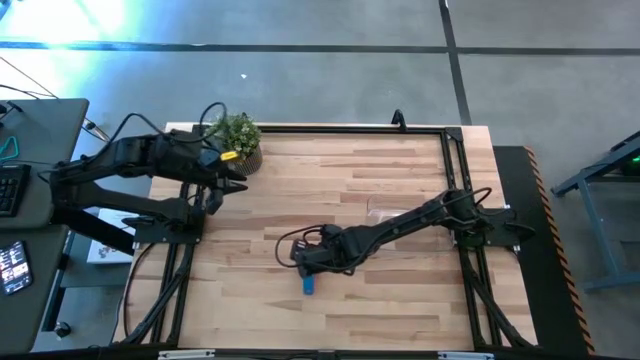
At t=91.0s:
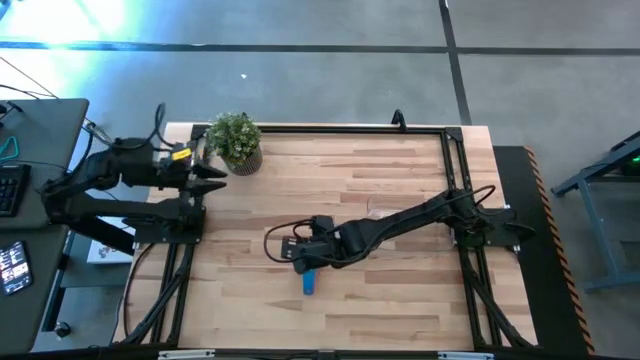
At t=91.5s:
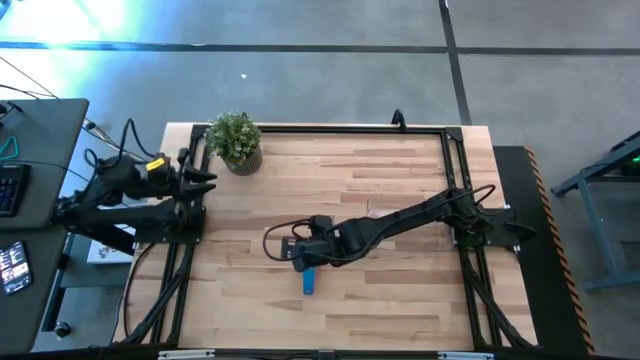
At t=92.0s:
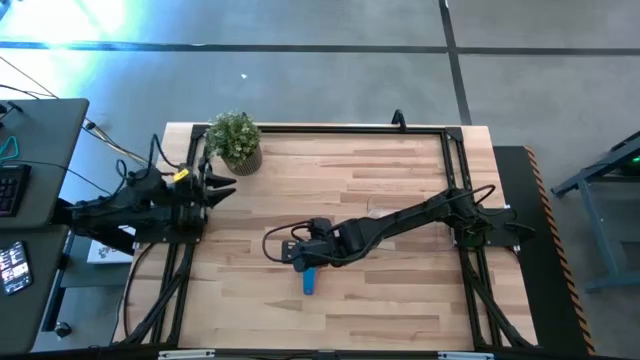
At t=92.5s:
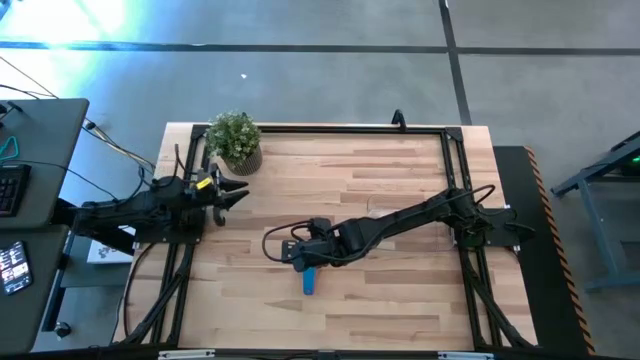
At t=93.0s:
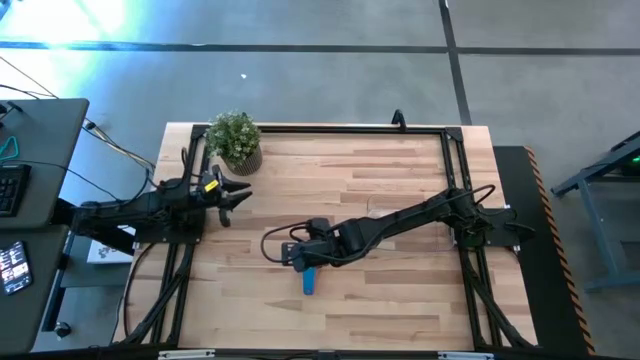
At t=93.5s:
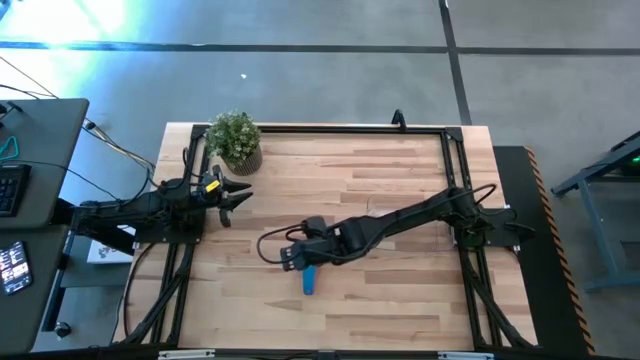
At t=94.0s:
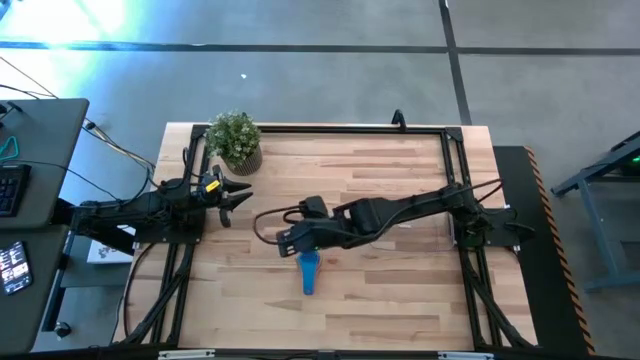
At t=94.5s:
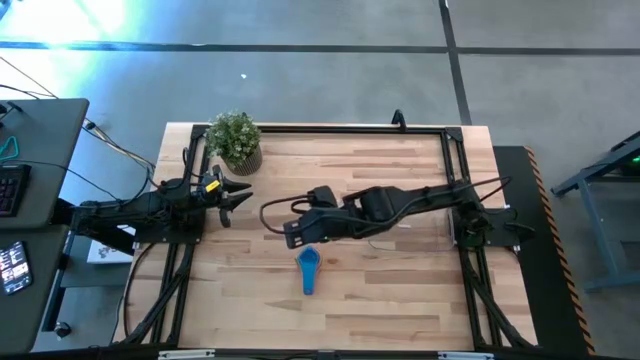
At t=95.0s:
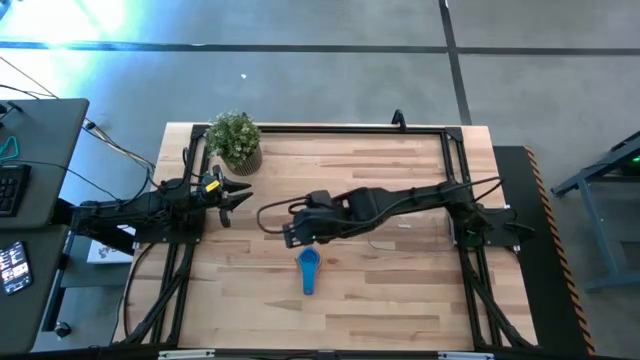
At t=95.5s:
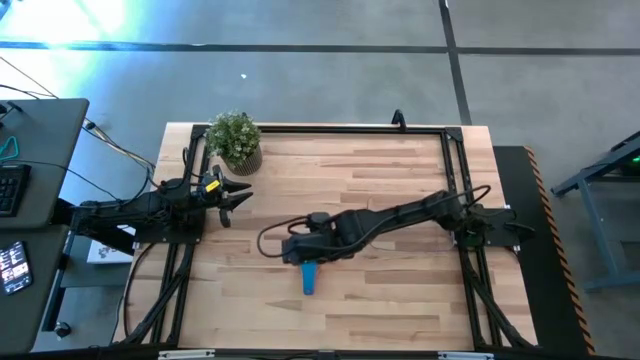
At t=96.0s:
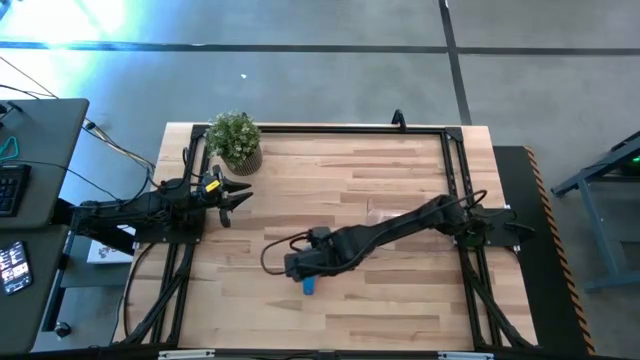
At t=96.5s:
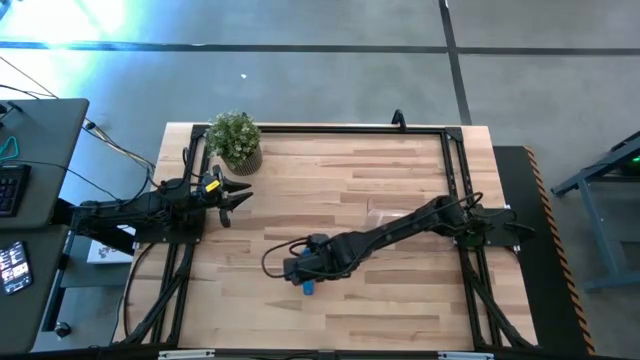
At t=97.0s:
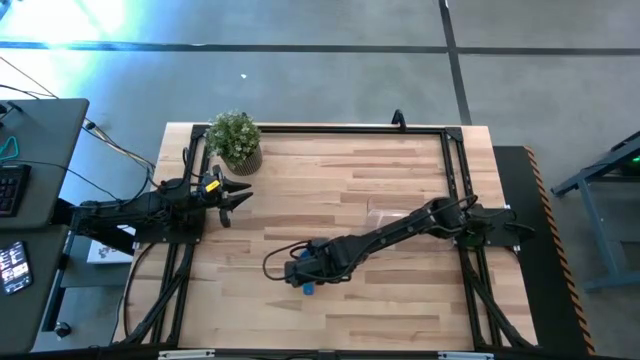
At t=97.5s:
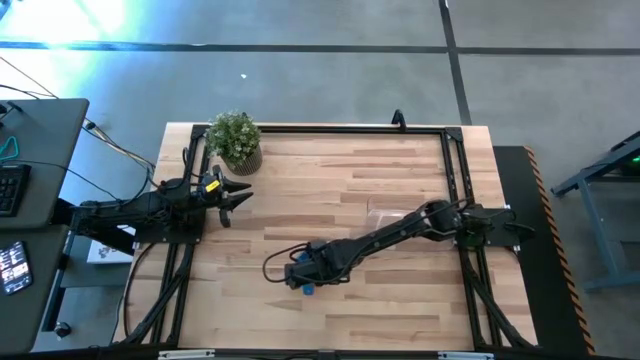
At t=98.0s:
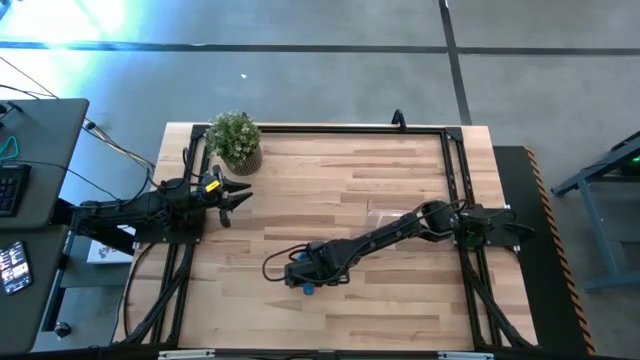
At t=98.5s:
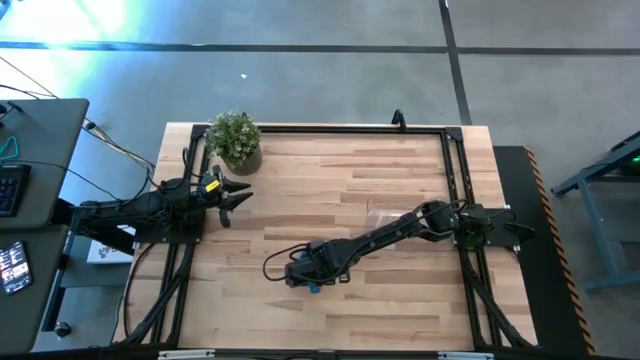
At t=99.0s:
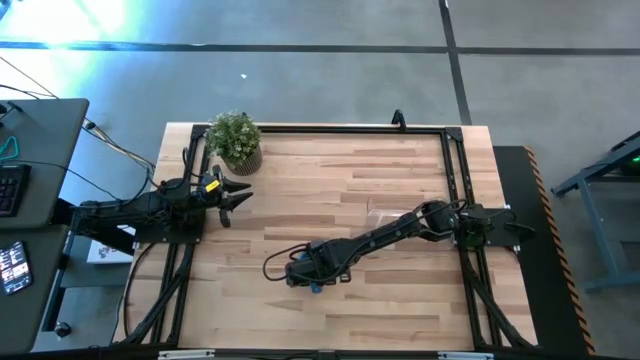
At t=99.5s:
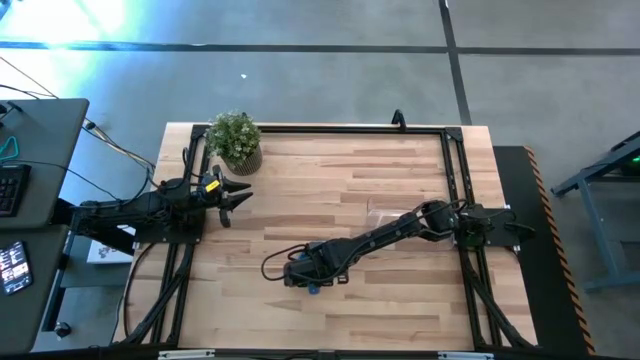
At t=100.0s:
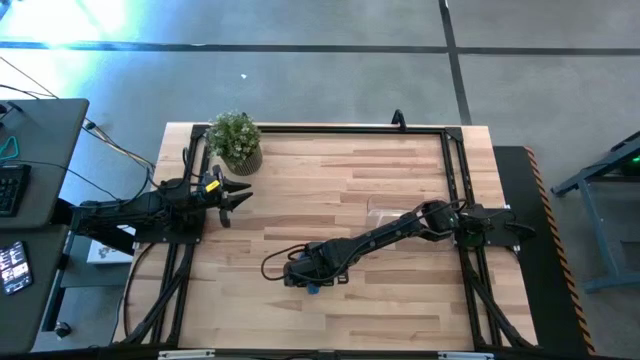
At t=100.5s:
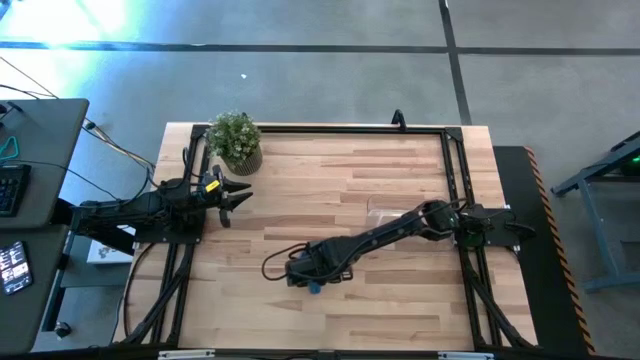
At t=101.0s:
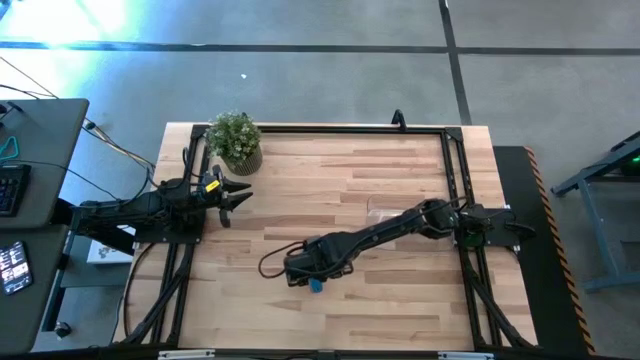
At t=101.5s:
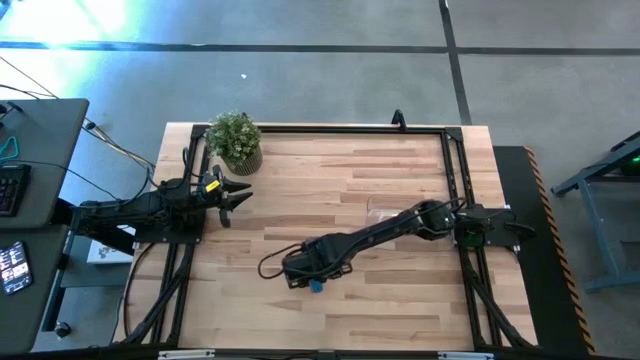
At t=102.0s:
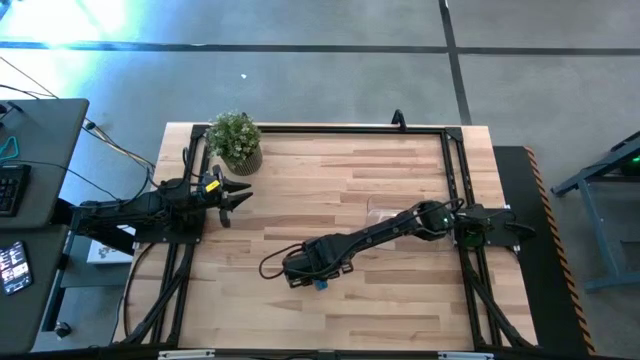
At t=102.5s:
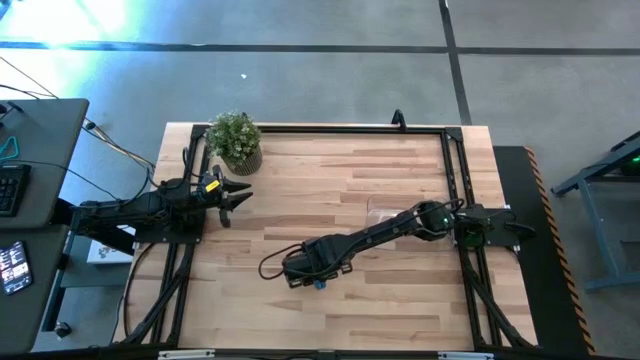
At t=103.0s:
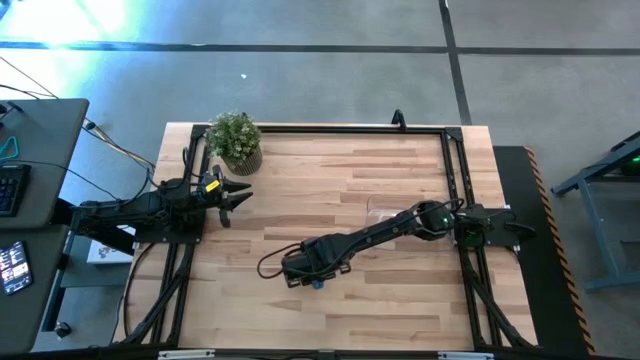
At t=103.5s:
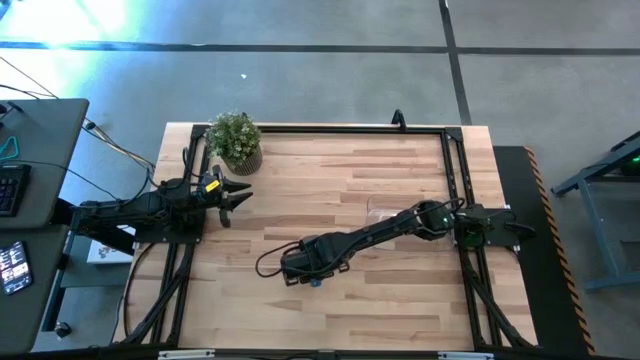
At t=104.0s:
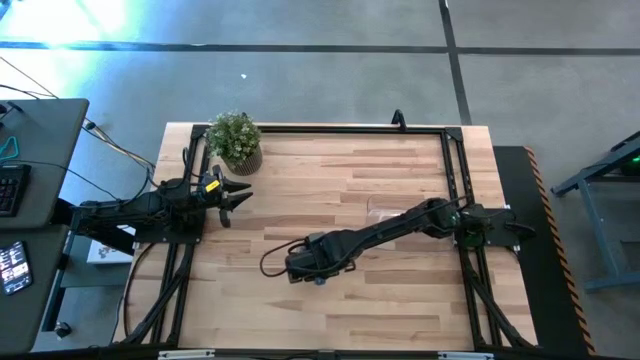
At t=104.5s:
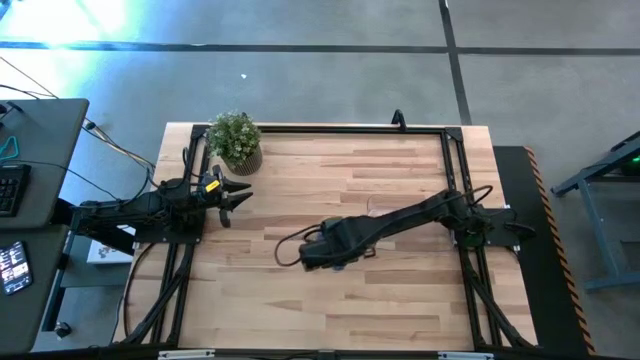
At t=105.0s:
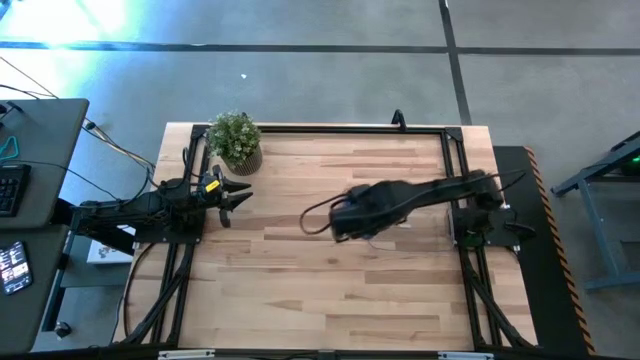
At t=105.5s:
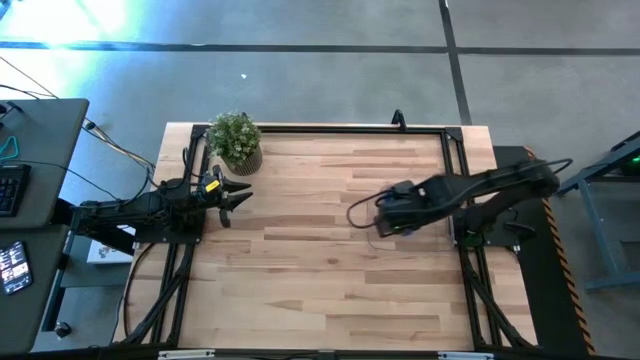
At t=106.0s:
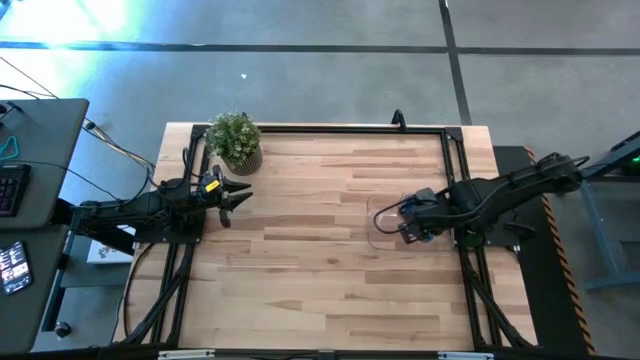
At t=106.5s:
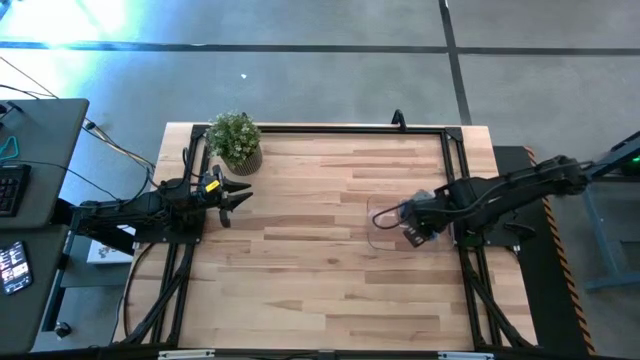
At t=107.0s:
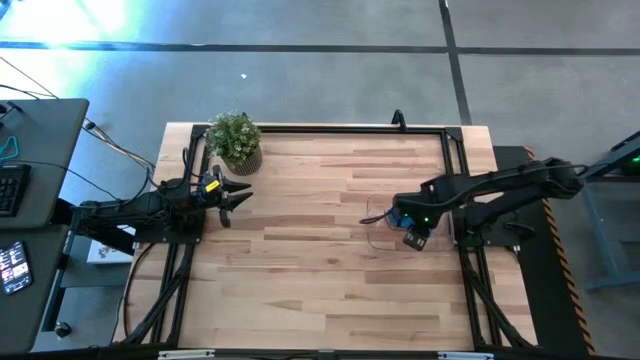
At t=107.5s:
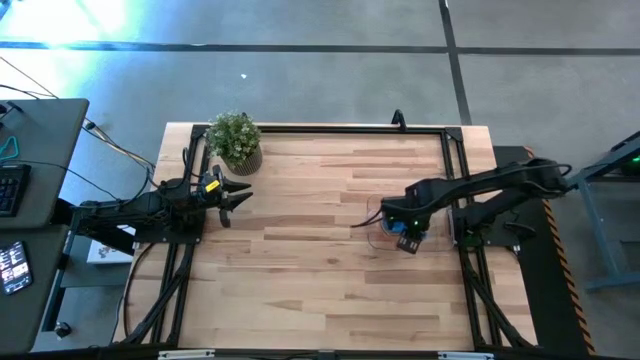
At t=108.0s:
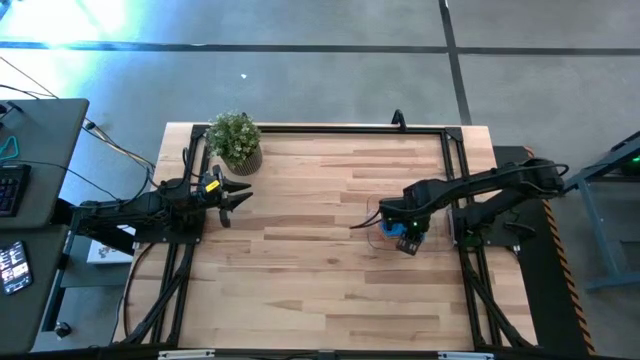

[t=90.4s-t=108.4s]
Task: Nest measuring cups in basket
Put the nested measuring cups into the transparent bin

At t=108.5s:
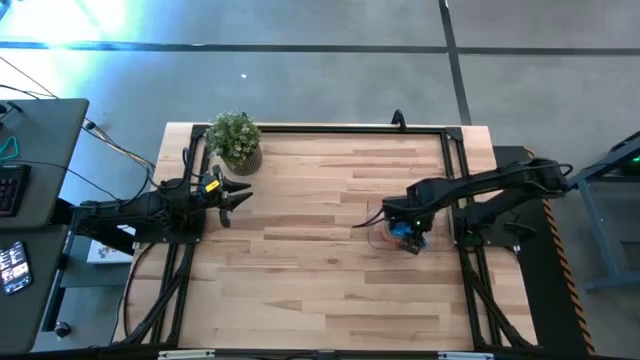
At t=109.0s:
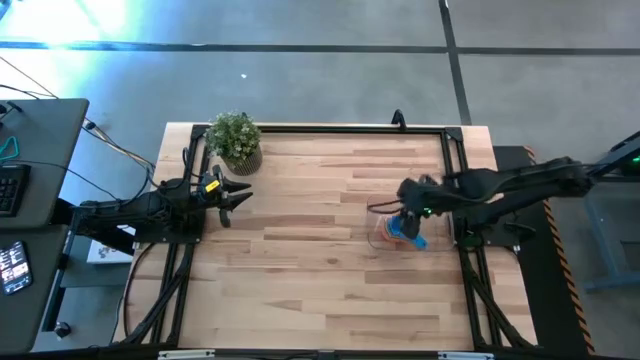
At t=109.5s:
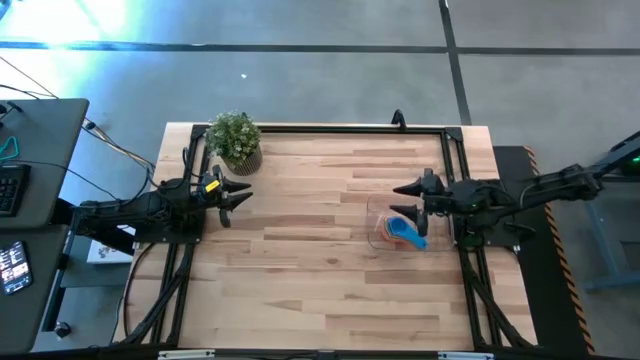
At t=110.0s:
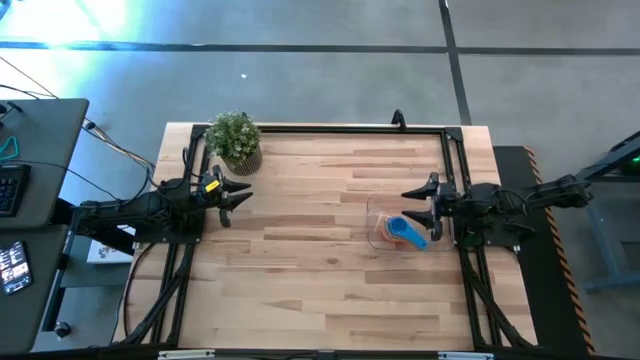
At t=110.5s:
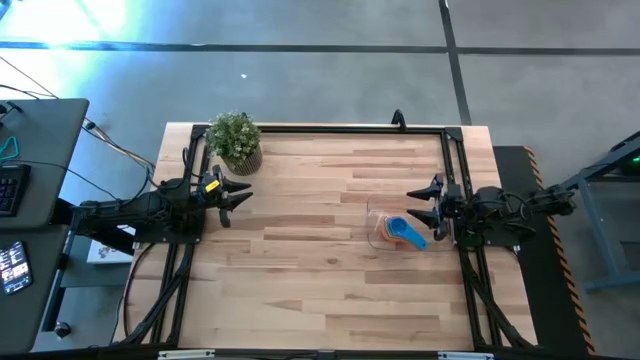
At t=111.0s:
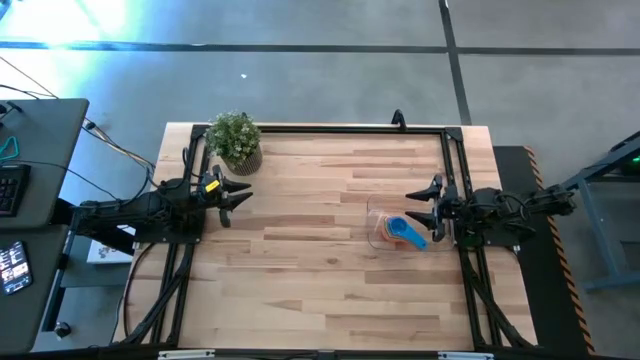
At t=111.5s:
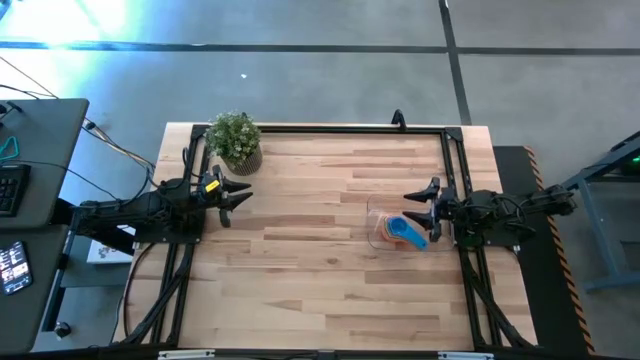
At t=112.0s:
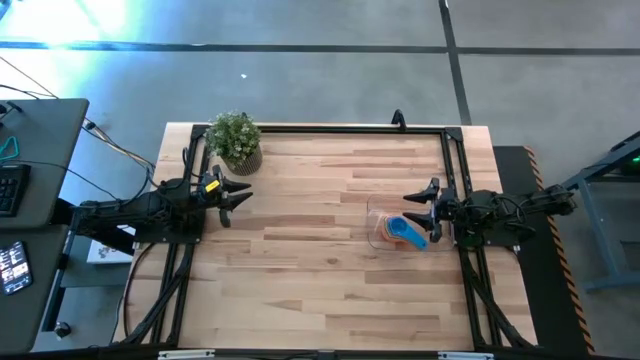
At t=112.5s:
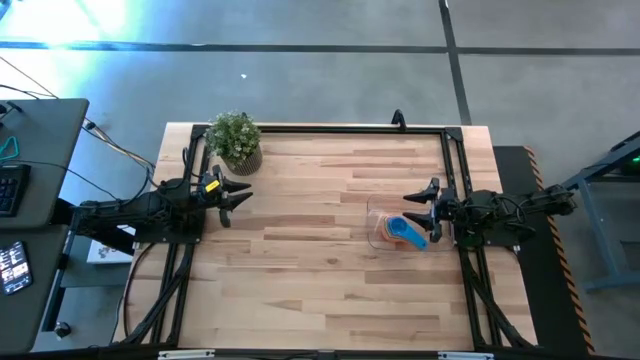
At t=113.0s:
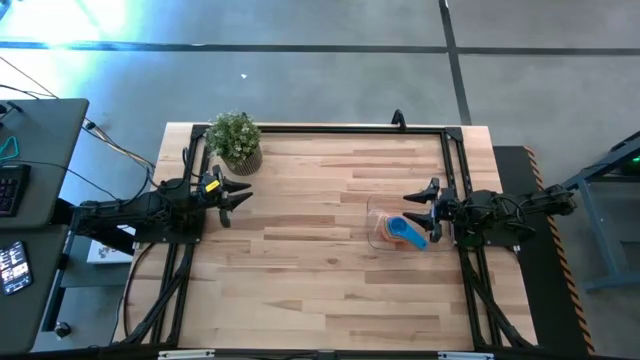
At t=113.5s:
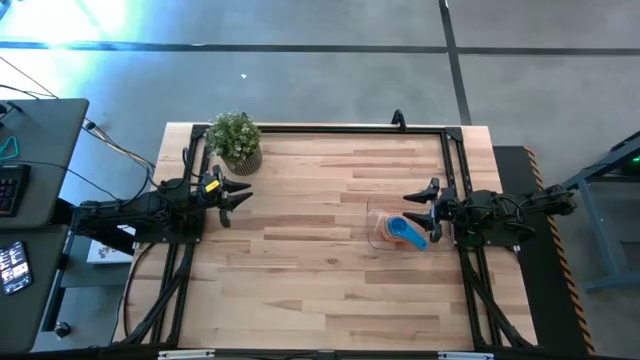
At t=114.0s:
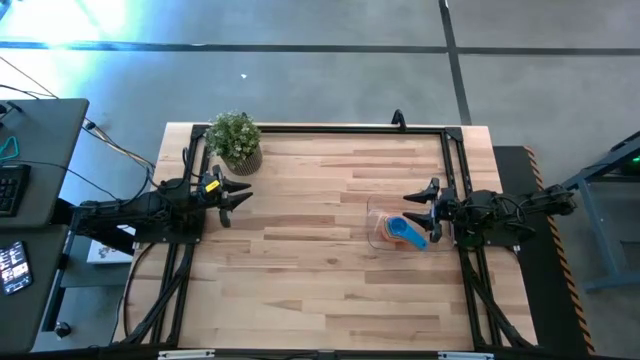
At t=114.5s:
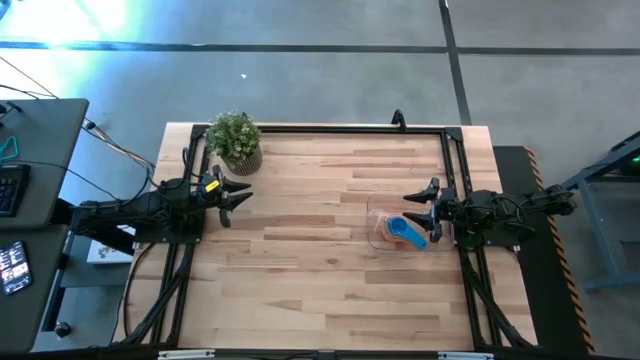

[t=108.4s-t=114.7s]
Return to Home Position
